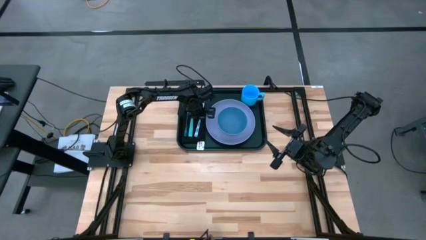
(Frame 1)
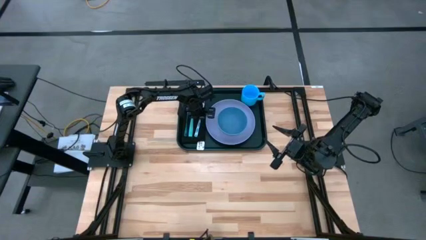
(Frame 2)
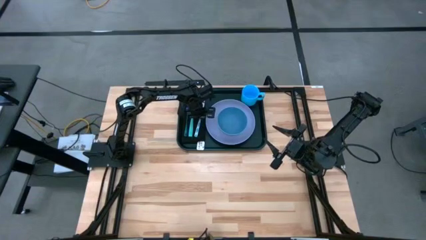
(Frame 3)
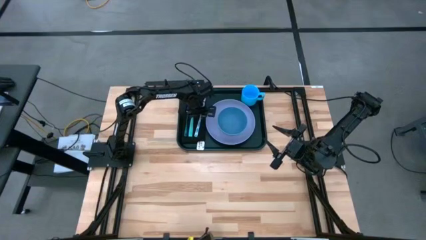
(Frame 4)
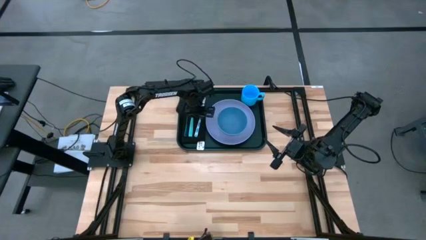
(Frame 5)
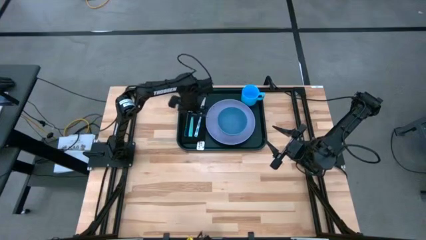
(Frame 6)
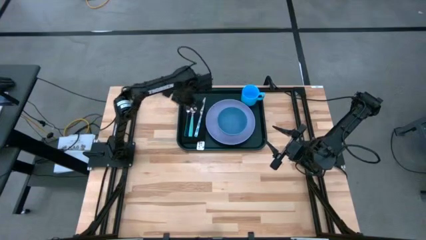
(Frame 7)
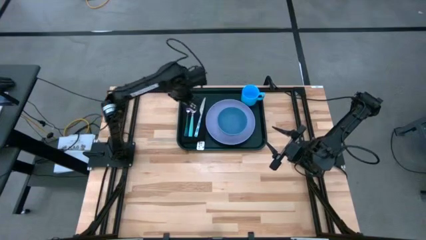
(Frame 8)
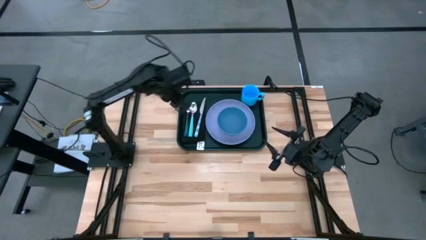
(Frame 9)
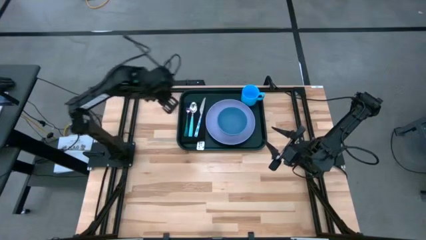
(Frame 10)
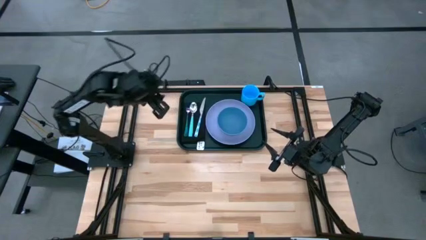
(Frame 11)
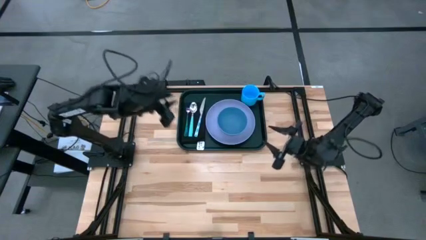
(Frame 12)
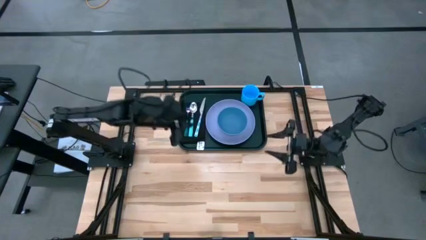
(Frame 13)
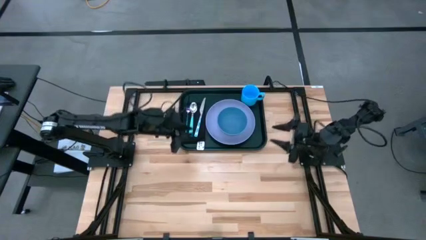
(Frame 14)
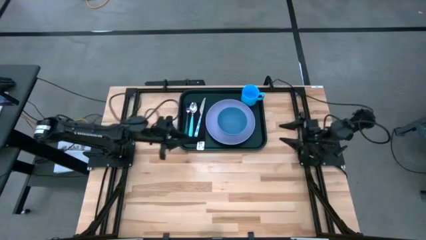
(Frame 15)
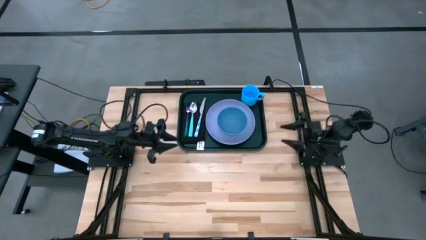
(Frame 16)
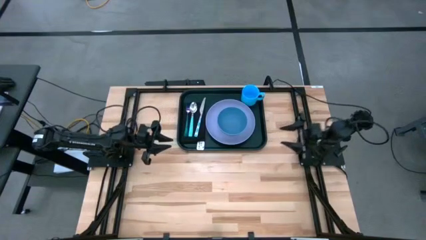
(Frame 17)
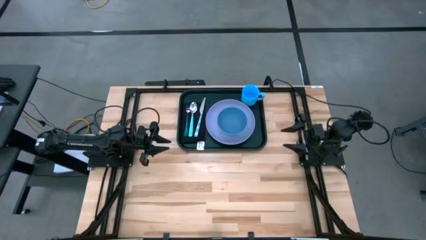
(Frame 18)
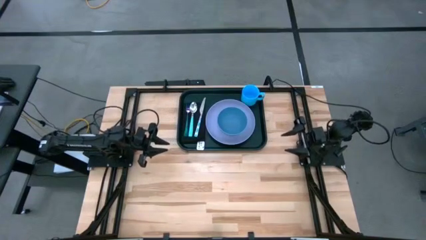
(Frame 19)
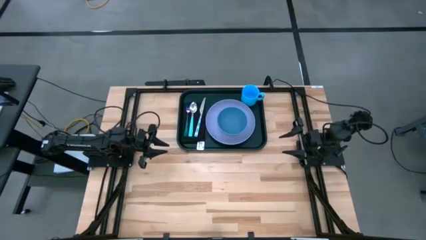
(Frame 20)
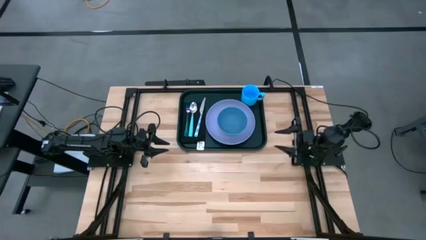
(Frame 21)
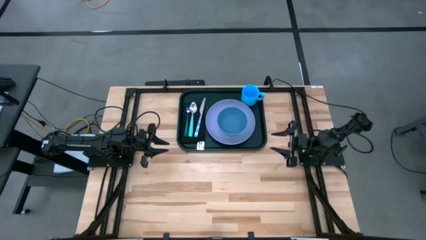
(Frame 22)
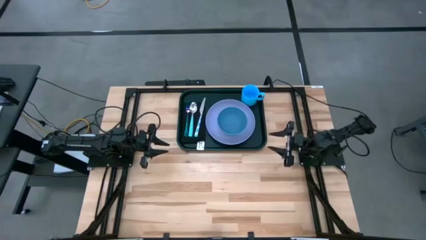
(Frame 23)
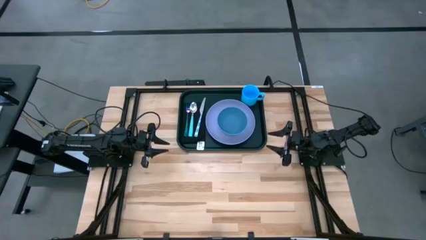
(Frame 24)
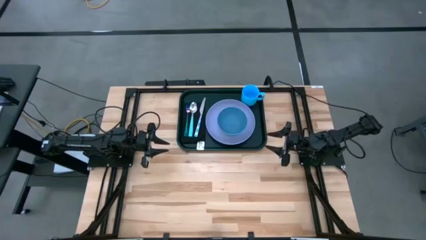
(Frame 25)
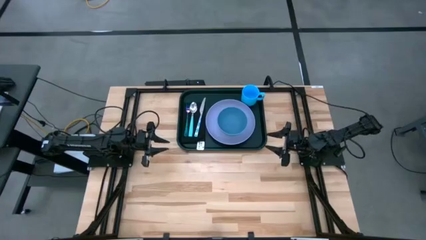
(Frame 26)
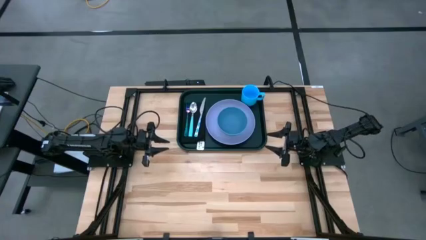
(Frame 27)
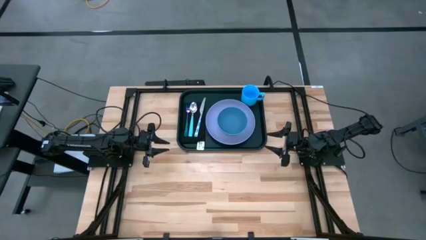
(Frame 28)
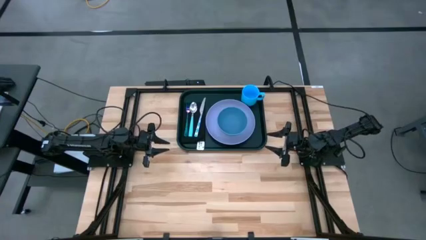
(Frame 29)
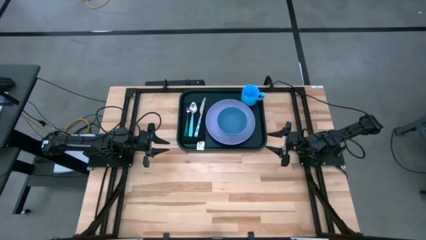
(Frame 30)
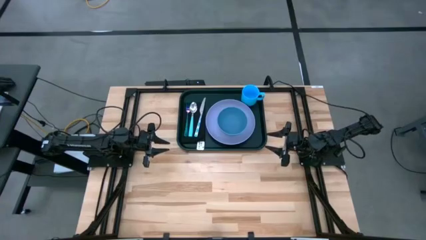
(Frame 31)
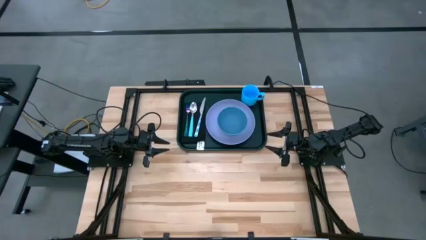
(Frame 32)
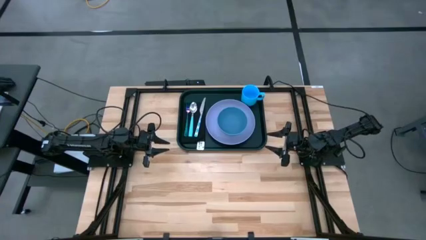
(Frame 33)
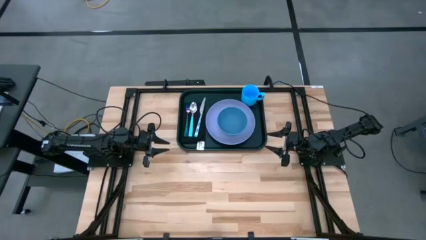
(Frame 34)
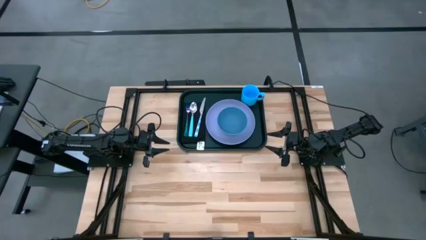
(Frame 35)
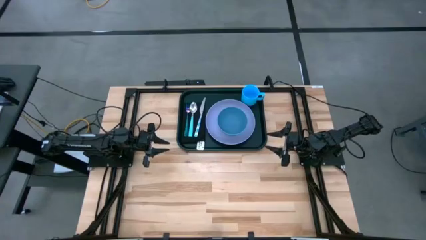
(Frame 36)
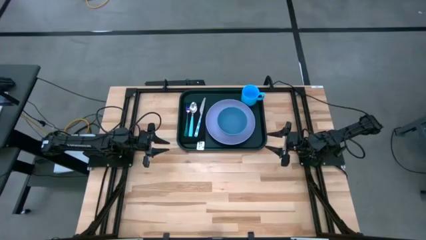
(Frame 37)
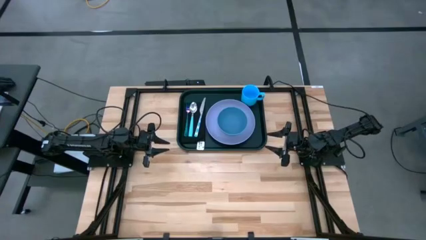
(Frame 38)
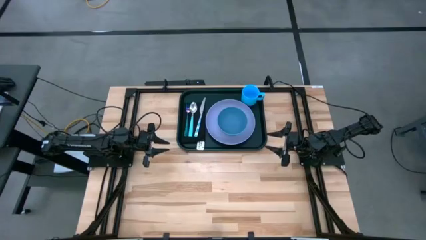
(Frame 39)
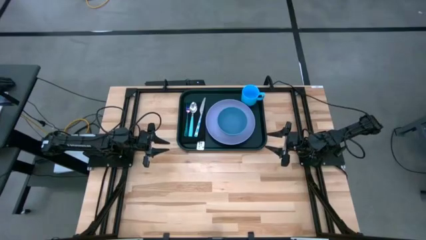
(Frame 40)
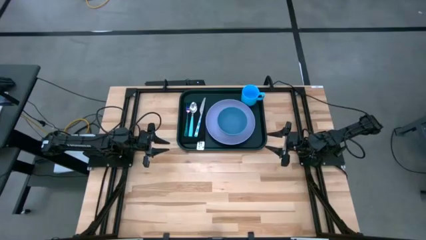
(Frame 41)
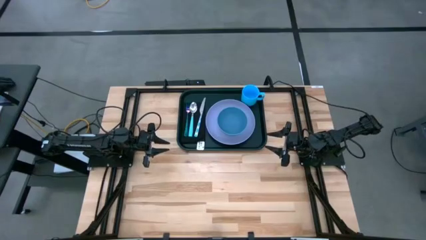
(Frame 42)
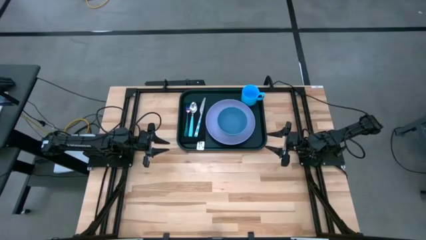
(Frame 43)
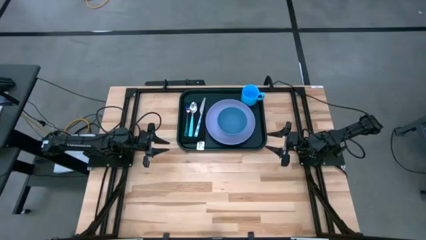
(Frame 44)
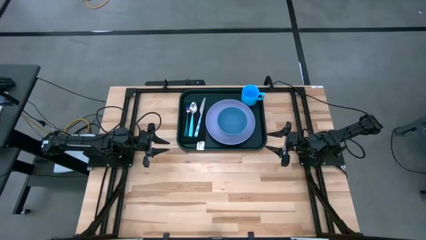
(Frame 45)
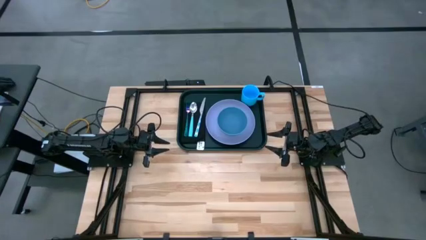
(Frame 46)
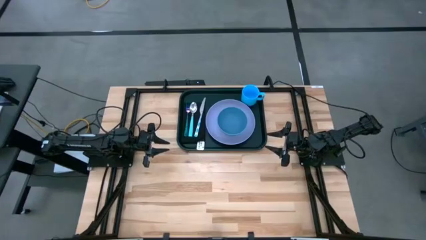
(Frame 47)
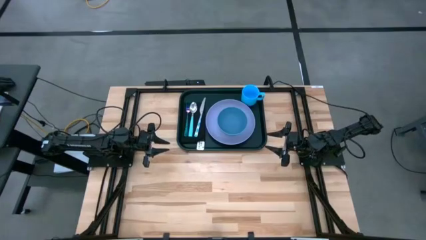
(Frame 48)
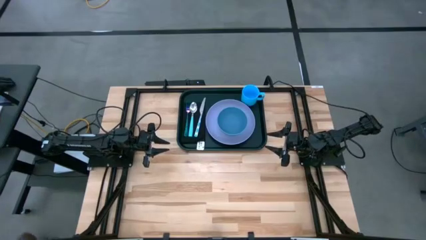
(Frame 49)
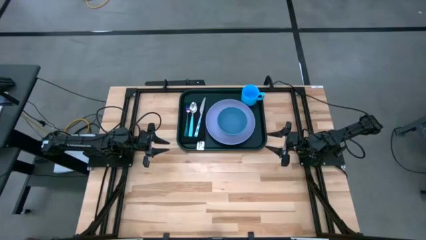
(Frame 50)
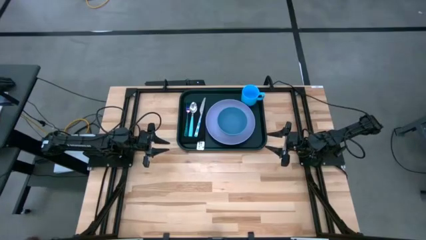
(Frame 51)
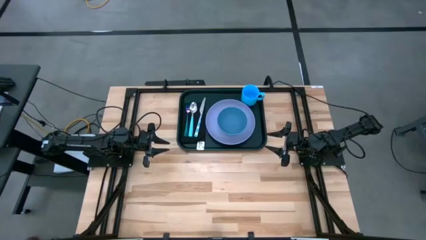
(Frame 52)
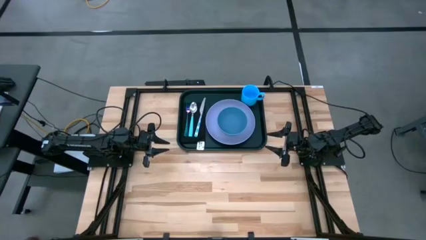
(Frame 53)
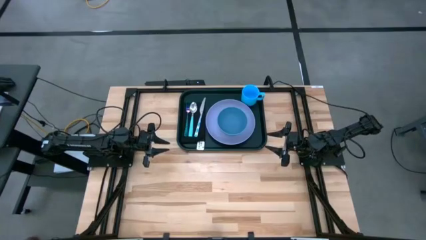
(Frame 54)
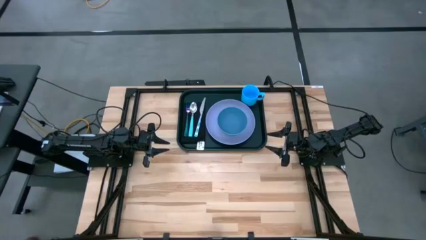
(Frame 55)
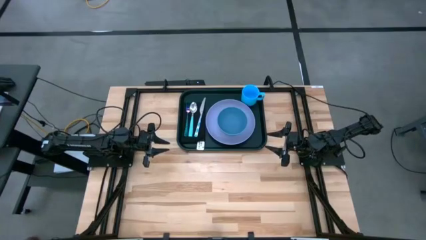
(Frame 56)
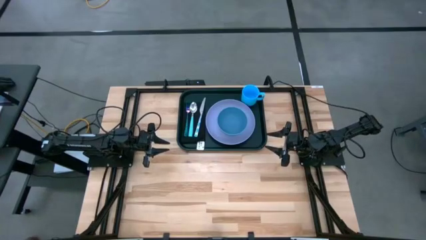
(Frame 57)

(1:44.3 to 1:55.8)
Task: Set up tray
Return to Home Position

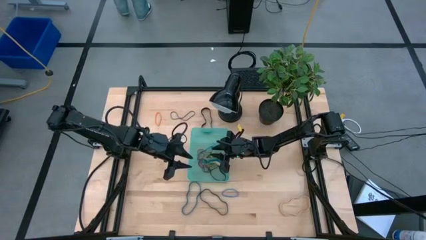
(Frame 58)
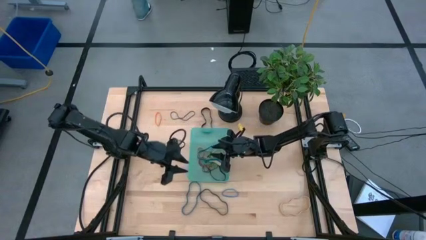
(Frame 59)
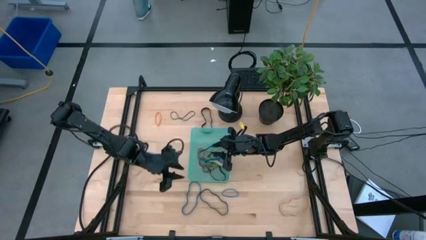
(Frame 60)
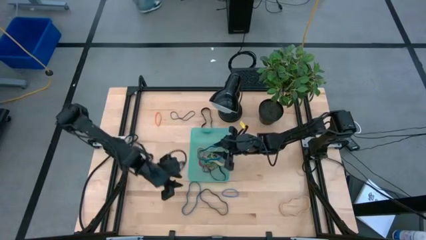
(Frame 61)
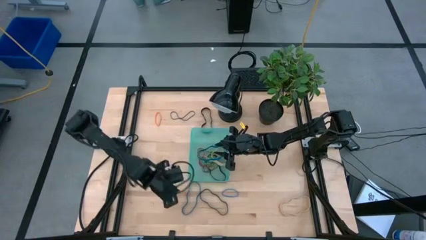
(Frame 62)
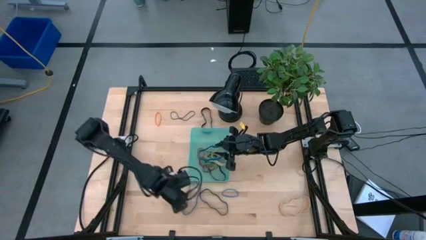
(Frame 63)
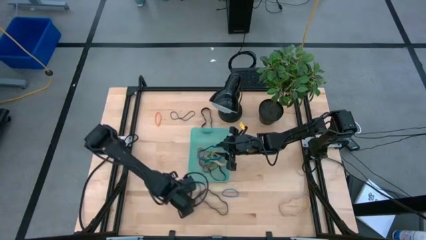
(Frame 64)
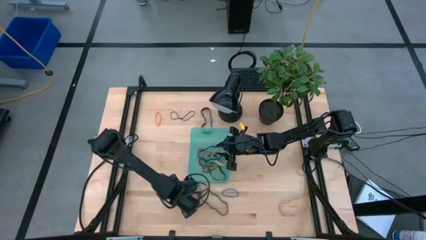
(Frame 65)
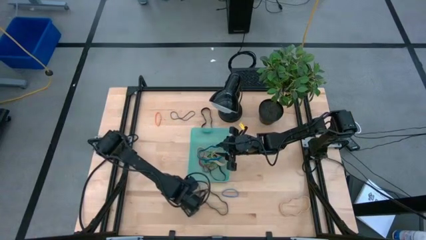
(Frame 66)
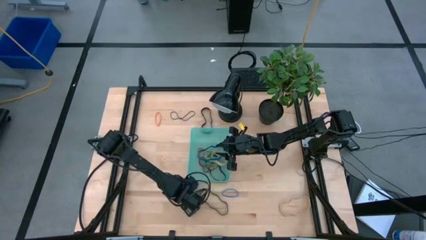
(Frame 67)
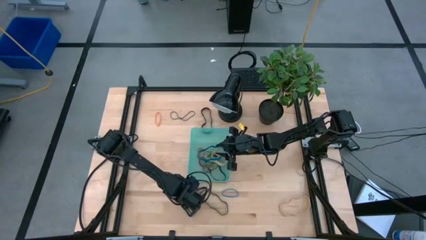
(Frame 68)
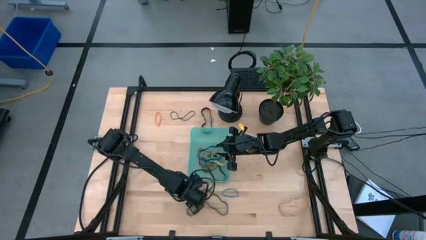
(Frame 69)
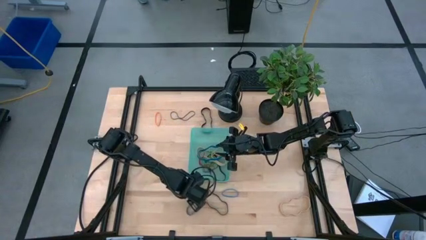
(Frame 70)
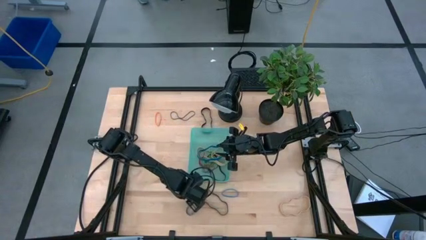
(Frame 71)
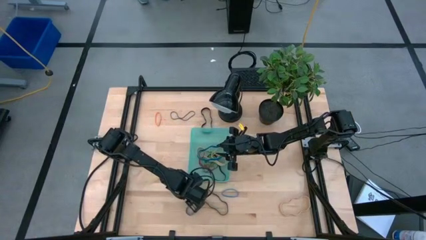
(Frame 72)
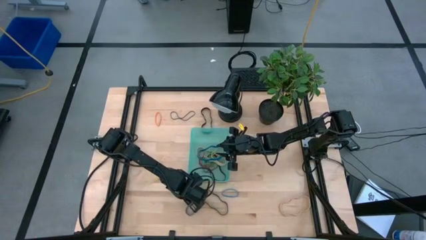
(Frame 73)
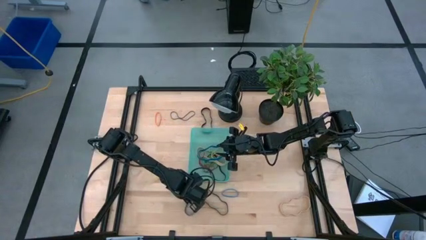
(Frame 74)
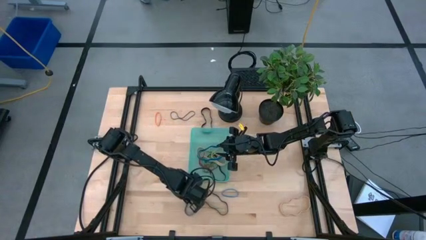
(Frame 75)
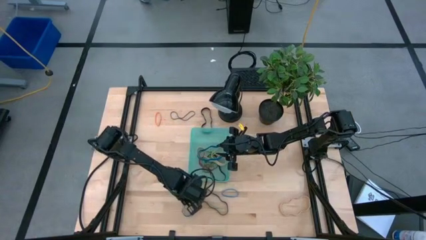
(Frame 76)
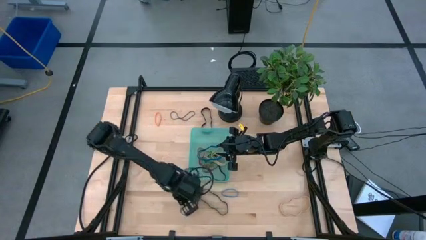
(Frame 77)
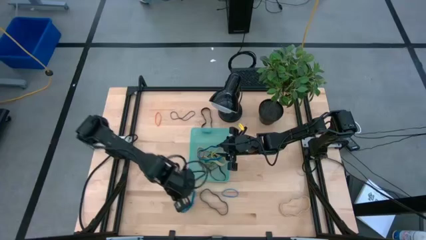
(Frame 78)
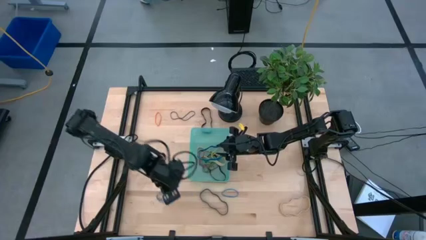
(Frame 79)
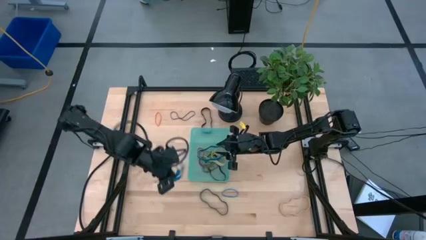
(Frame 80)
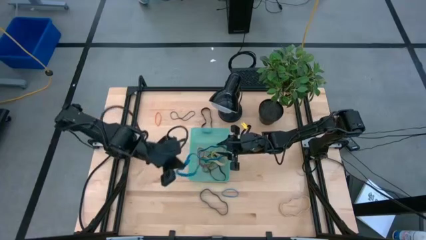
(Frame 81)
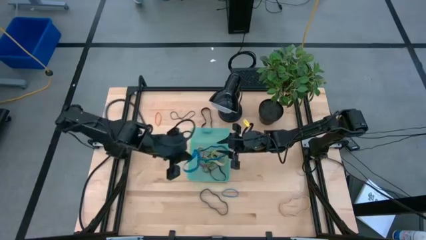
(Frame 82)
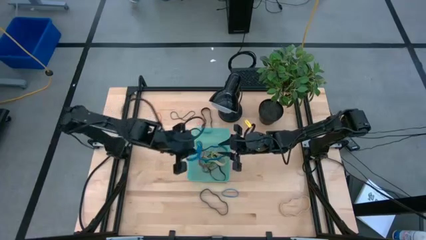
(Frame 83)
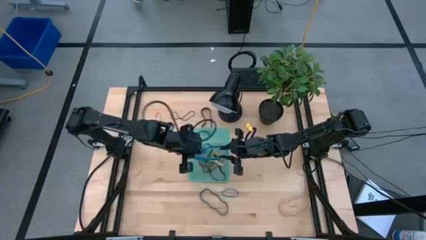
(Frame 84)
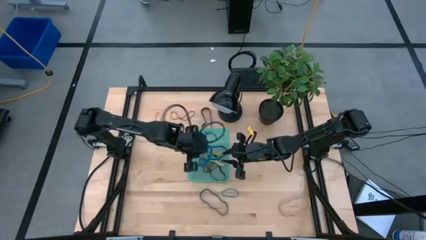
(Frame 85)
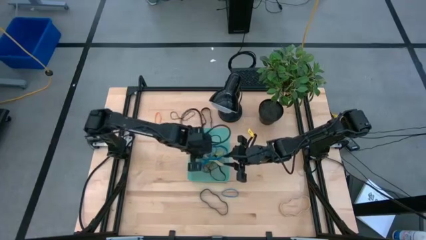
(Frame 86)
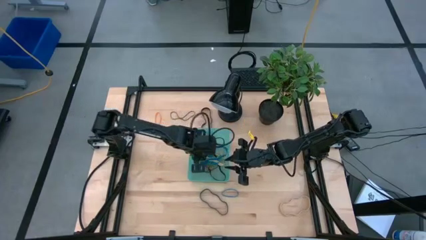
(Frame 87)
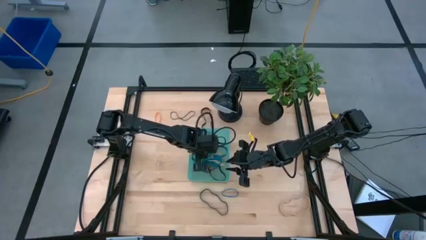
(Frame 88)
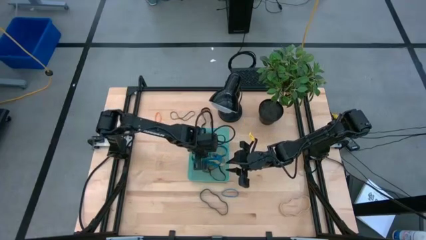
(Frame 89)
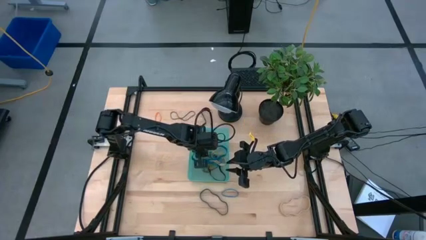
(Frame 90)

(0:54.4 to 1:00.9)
Task: Pick and place rubber bands into bin
Put the left blue rubber band into the basket
